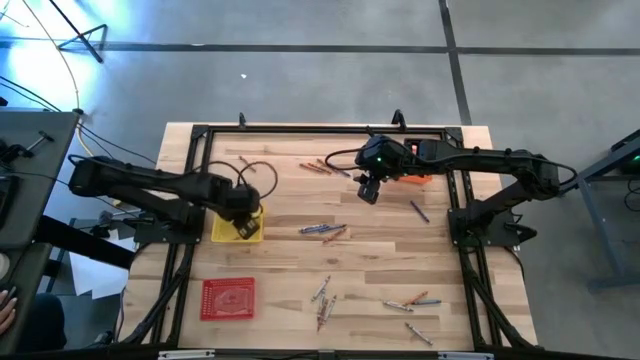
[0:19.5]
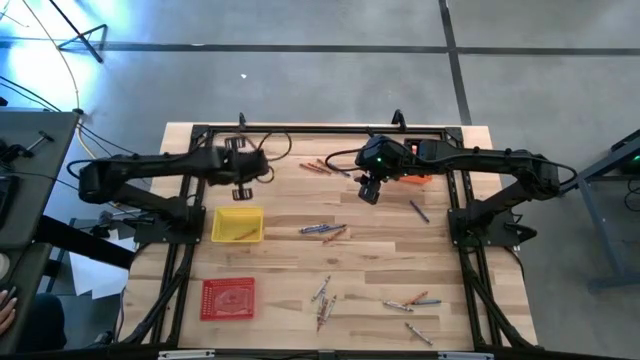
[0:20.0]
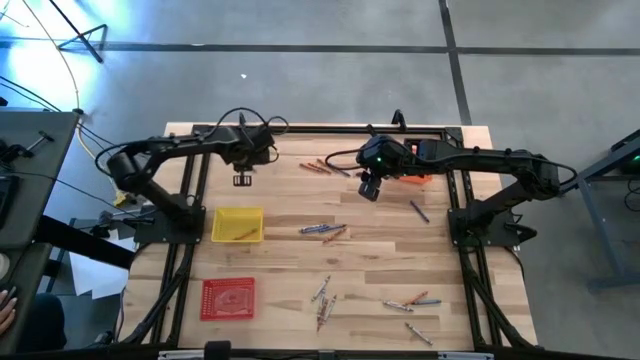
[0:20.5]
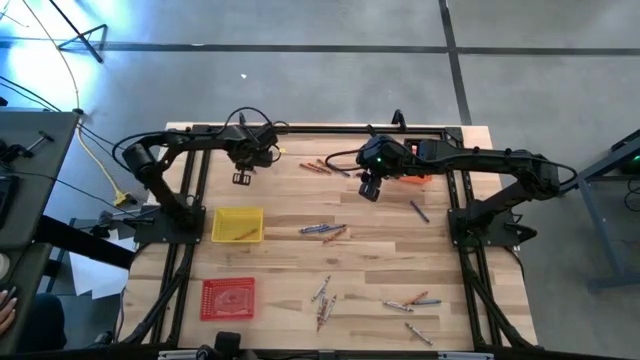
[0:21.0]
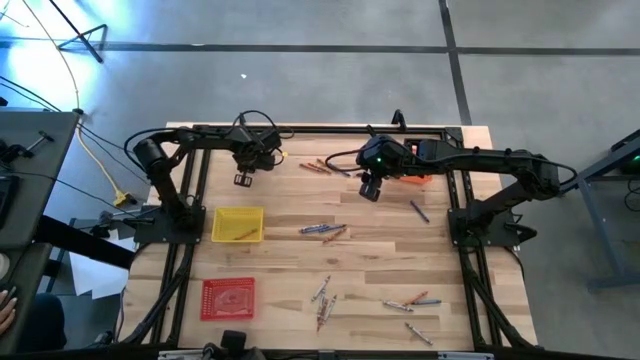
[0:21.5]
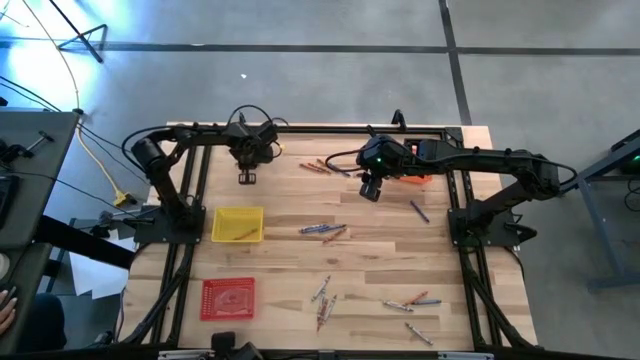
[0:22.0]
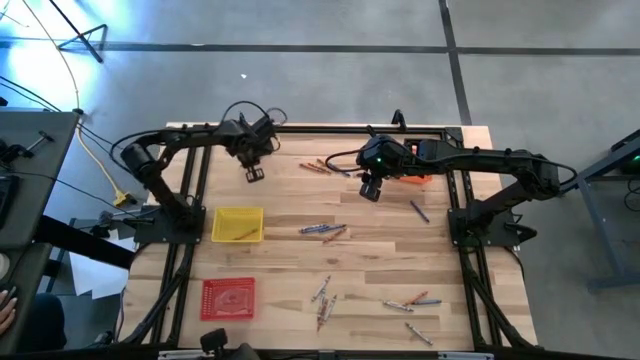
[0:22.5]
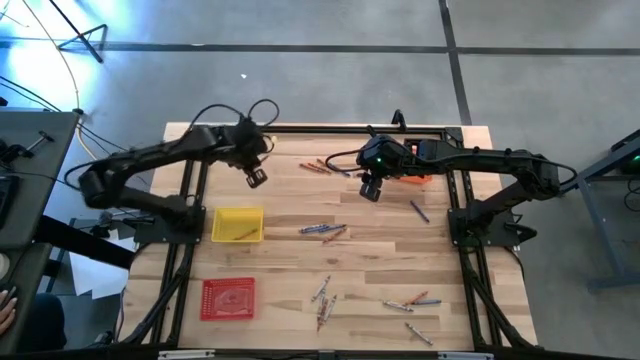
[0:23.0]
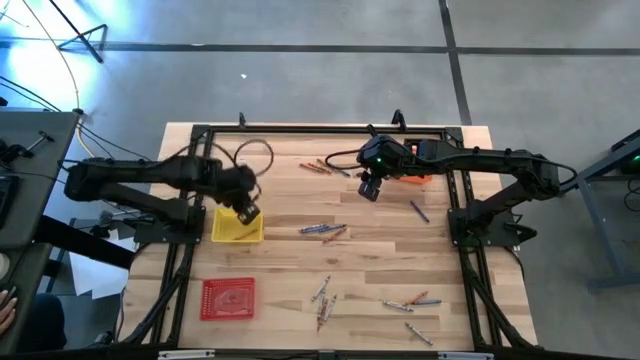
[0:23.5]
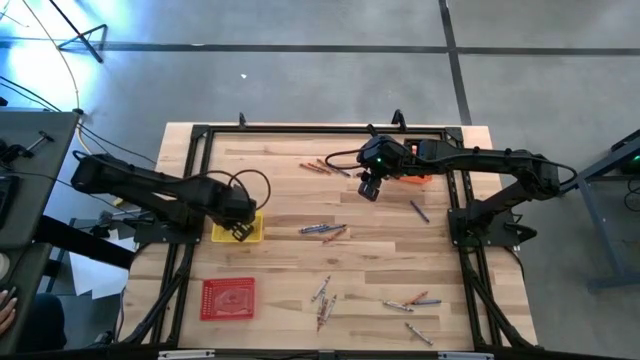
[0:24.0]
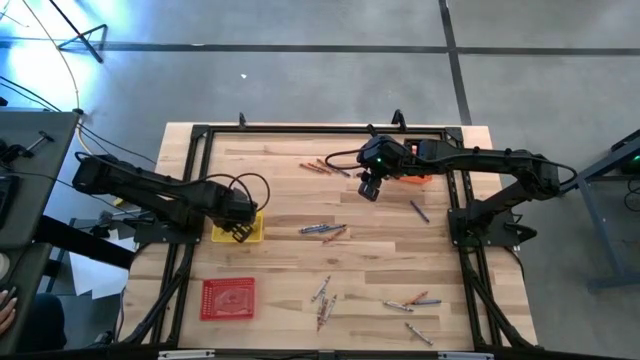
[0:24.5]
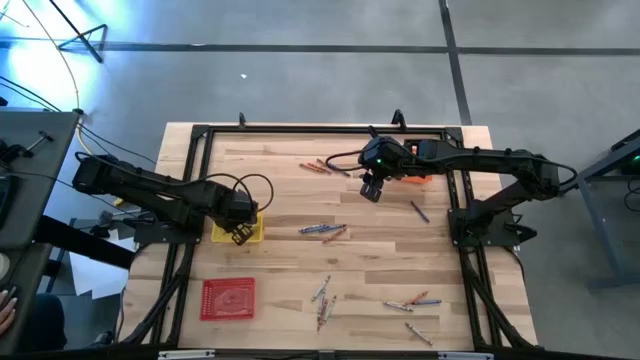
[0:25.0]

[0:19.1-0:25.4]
Task: Sort crayons
Put the orange crayon into the yellow bin

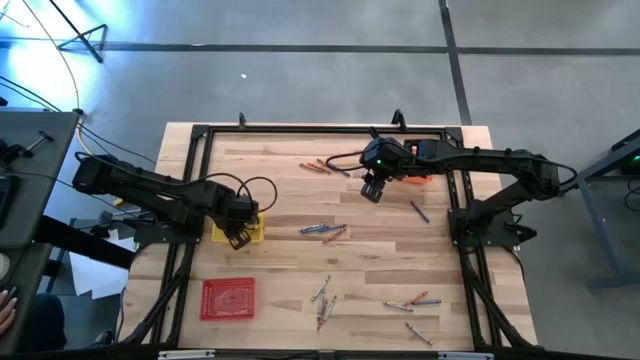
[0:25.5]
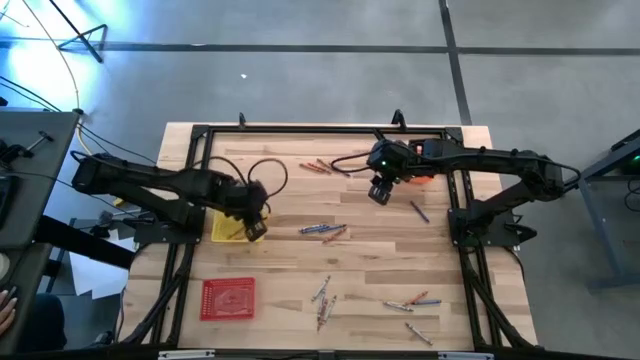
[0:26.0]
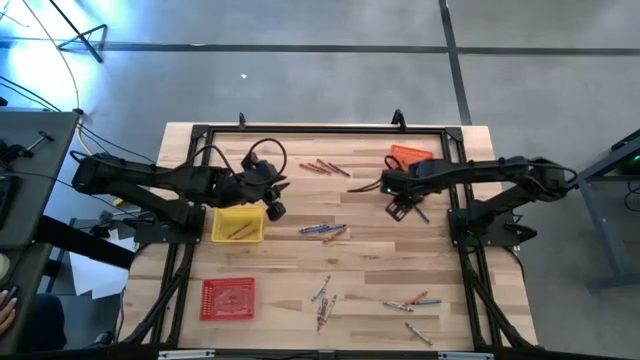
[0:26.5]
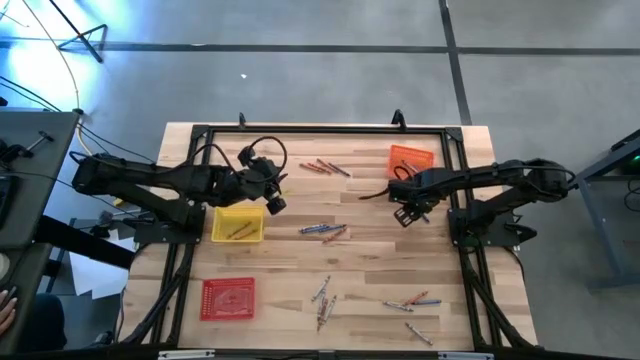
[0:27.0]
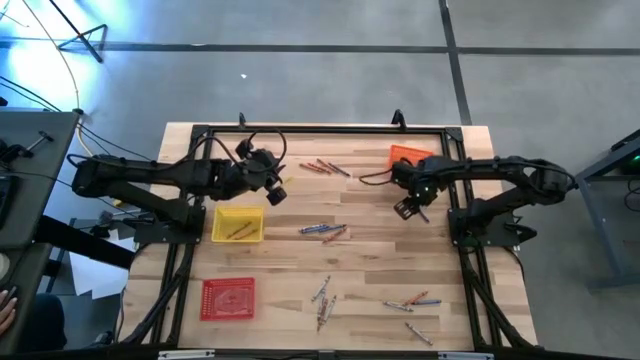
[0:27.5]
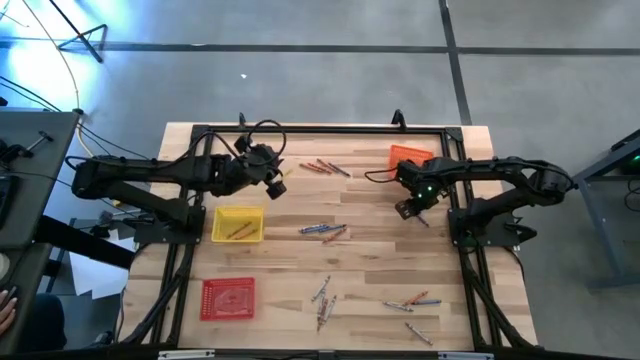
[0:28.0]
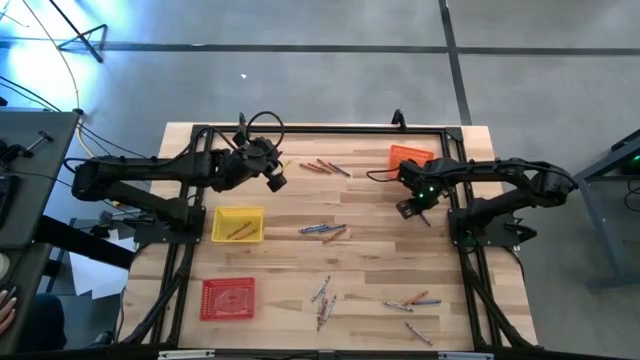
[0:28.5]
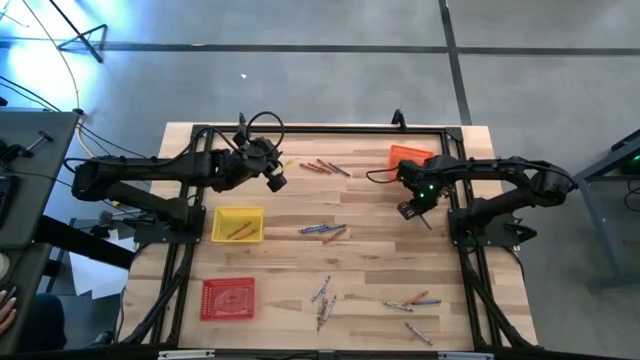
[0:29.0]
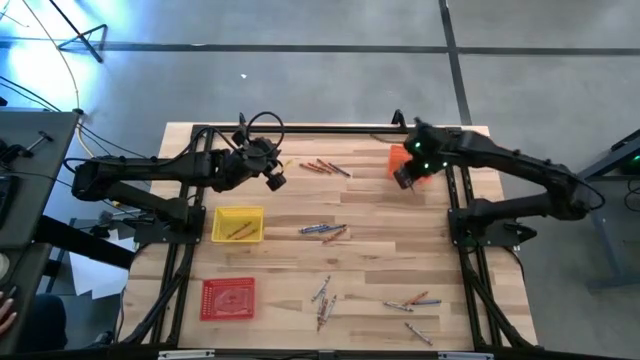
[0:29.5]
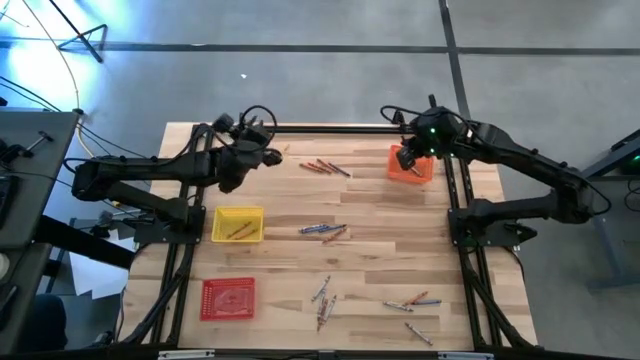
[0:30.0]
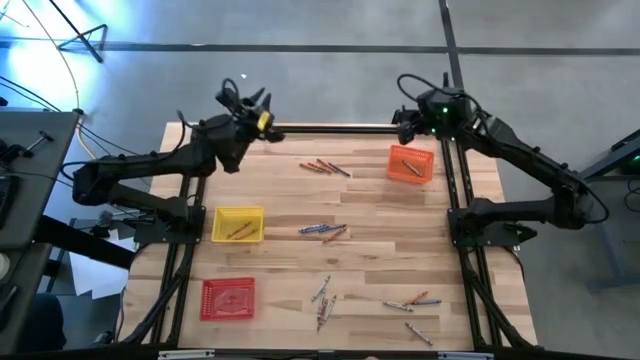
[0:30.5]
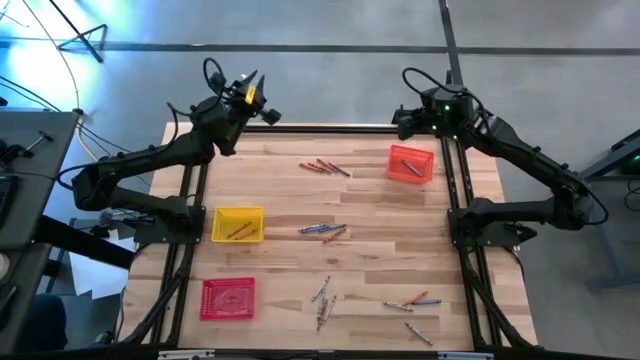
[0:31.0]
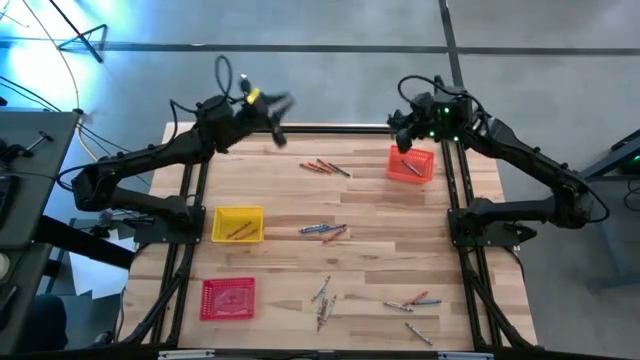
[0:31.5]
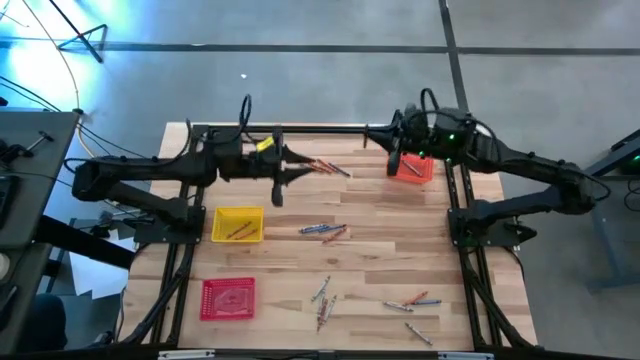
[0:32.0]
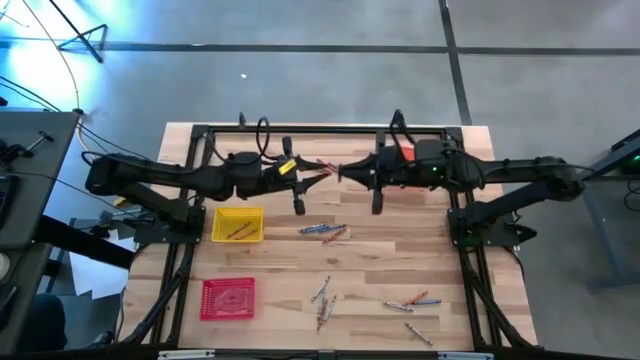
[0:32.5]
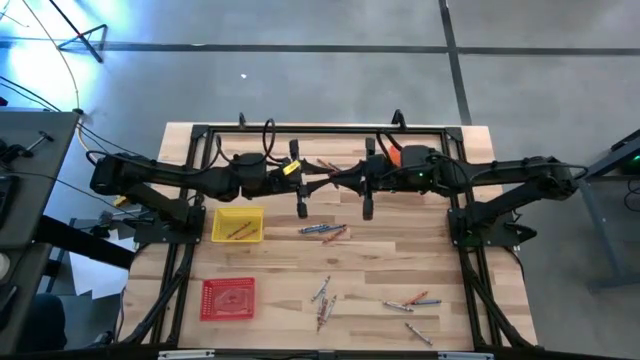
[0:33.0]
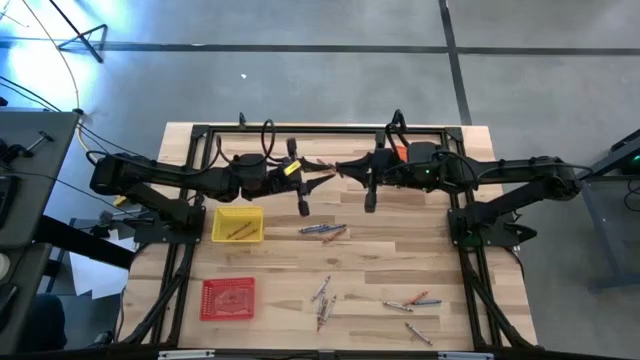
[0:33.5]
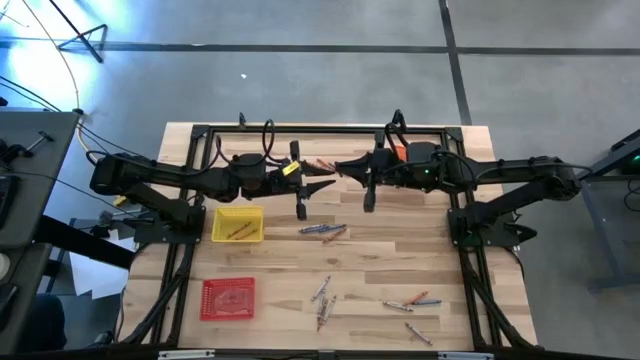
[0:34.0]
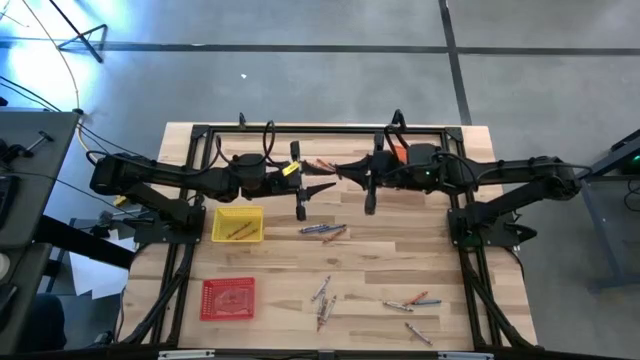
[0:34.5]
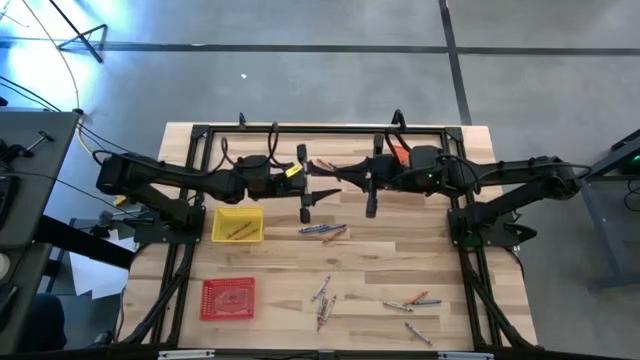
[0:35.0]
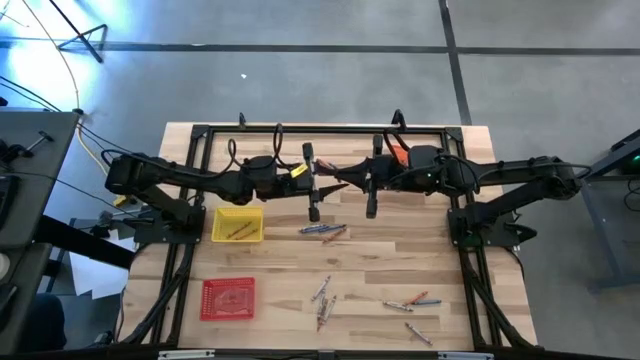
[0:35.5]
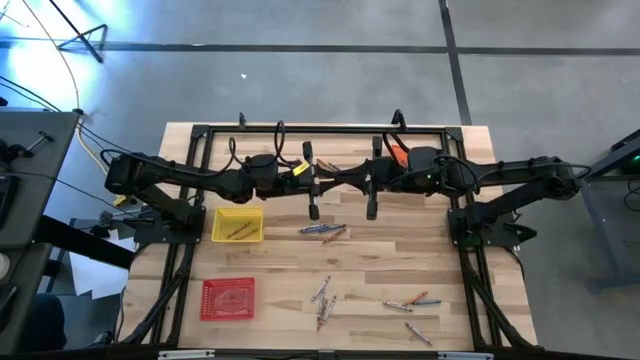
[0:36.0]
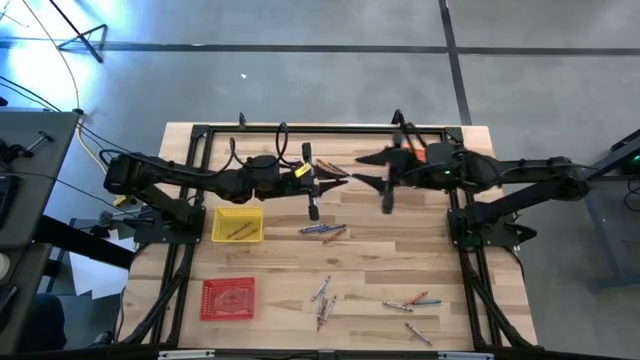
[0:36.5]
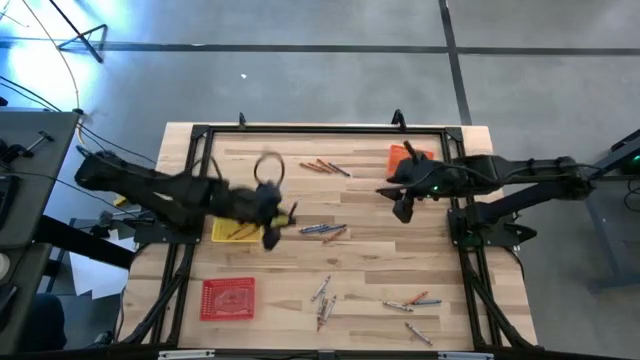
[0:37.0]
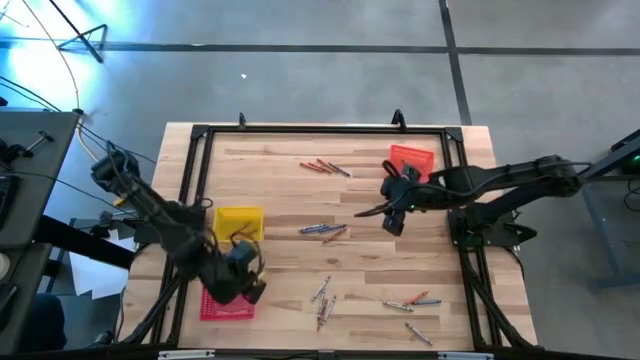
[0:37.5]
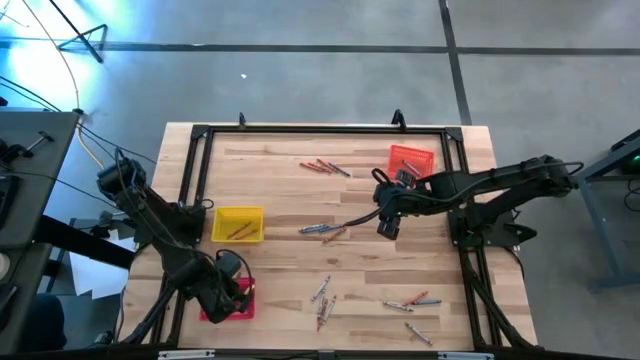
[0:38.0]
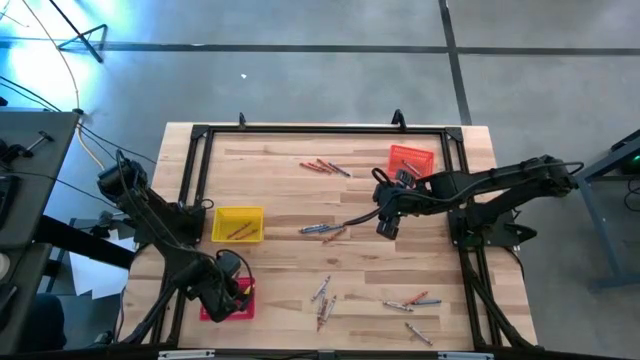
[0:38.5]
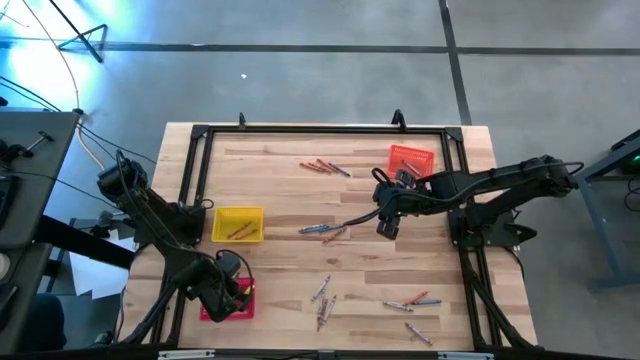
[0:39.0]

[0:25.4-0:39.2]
Put the blue crayon into the red bin

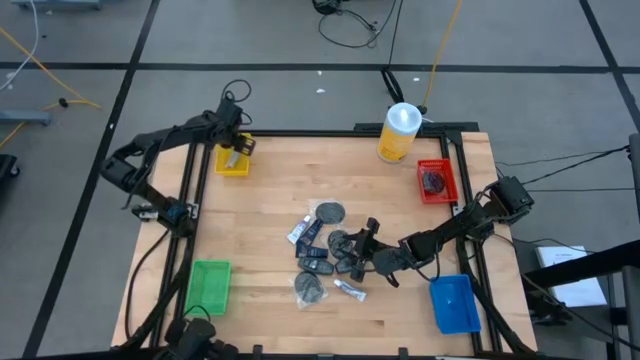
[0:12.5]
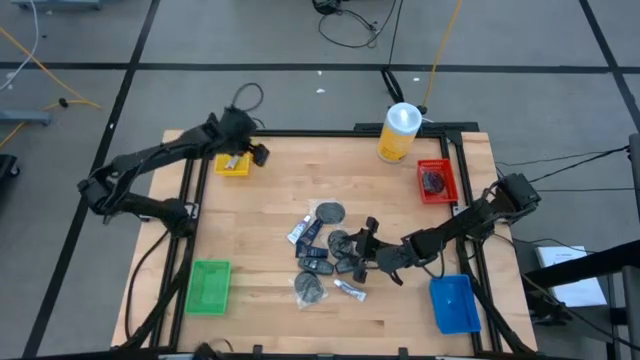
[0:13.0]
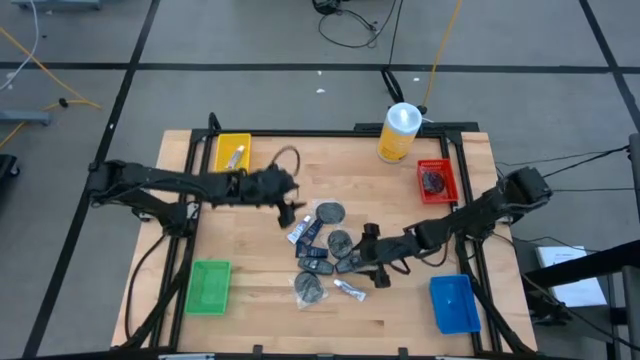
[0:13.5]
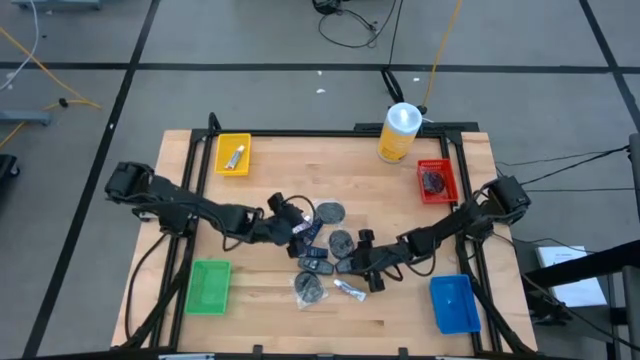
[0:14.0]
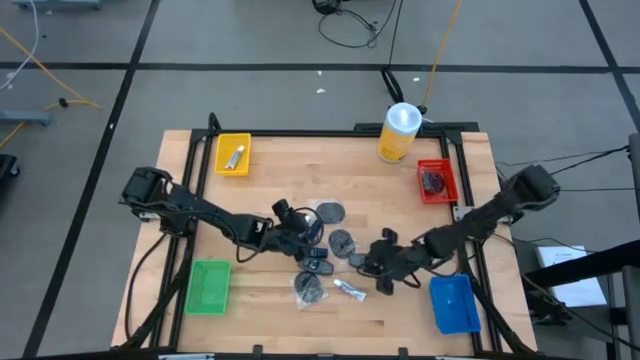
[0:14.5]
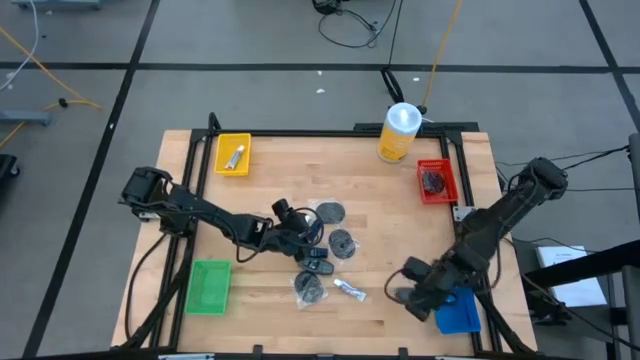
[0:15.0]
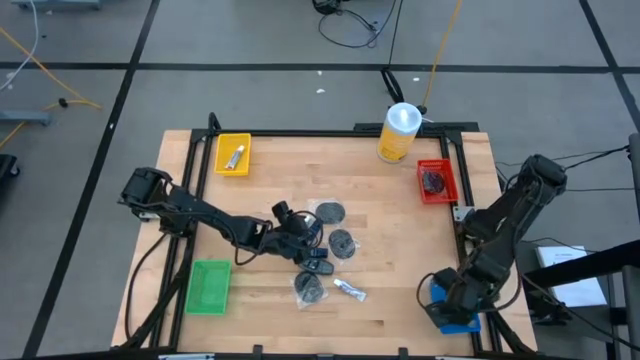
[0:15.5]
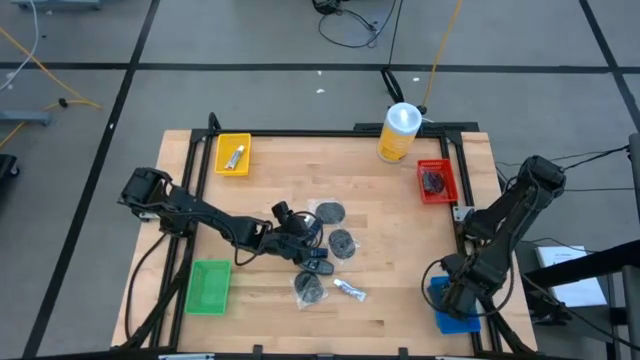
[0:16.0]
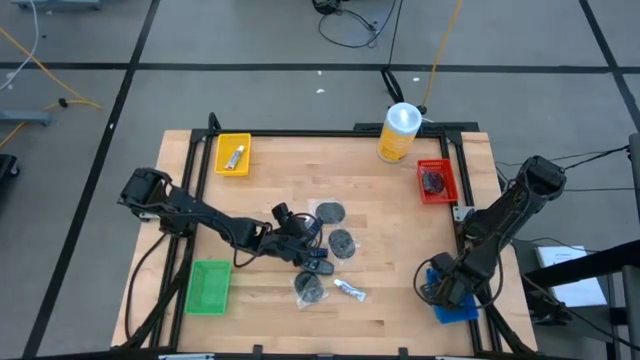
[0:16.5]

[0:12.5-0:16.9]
Task: Pick & Place Travel size toiletries
Put the black deodorant into the blue bin
